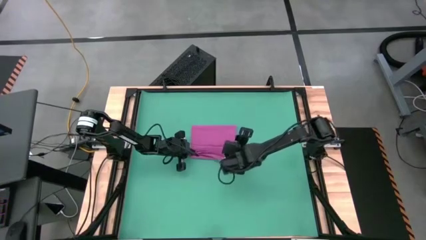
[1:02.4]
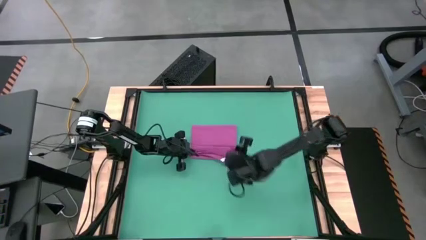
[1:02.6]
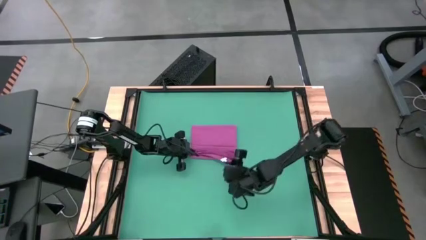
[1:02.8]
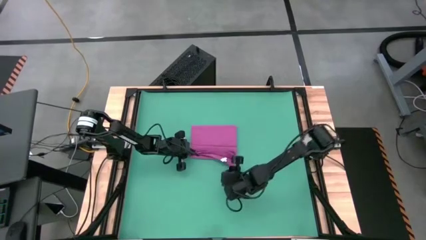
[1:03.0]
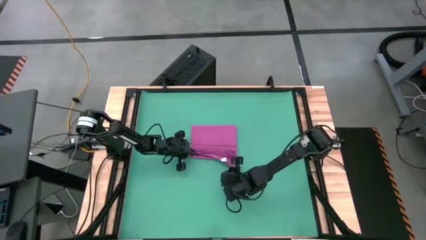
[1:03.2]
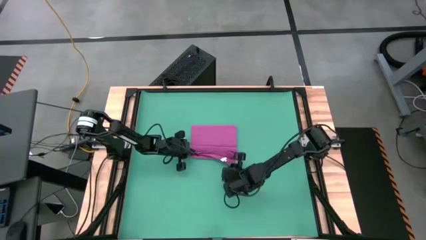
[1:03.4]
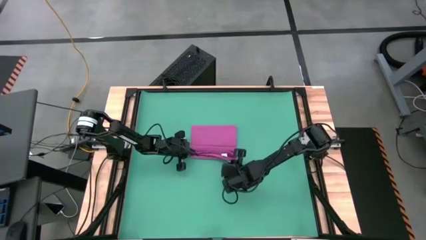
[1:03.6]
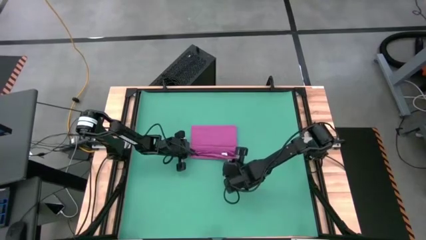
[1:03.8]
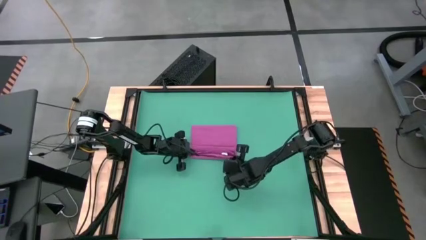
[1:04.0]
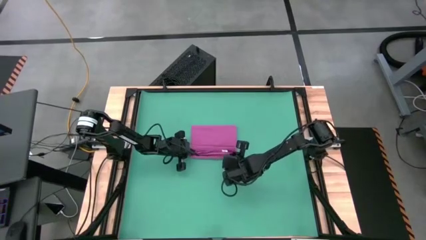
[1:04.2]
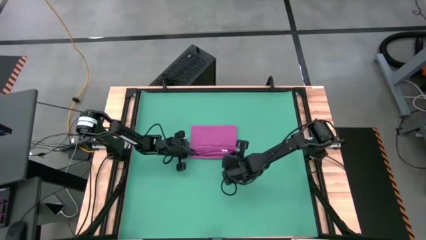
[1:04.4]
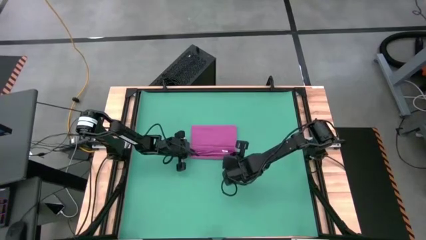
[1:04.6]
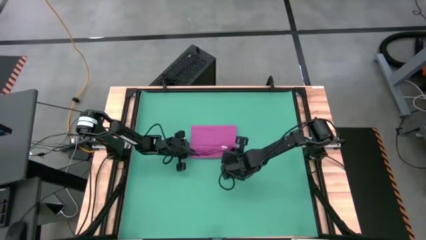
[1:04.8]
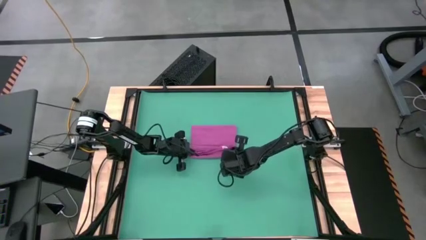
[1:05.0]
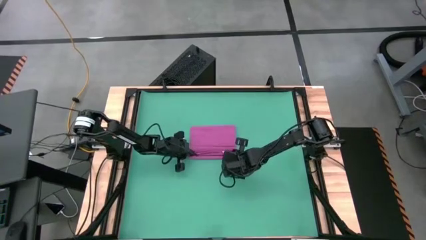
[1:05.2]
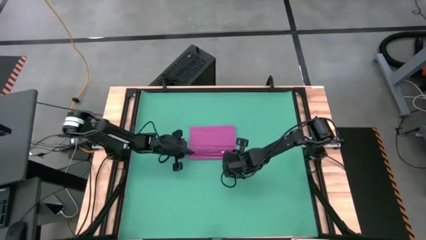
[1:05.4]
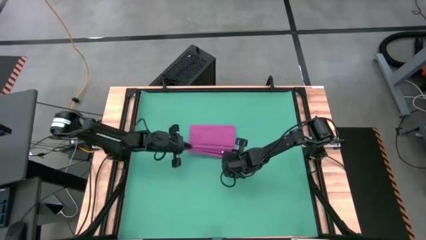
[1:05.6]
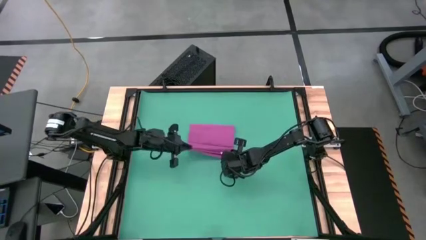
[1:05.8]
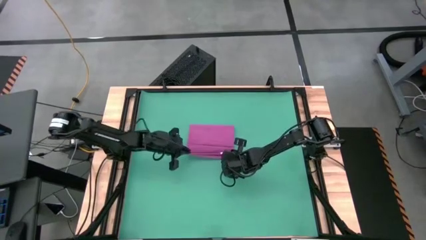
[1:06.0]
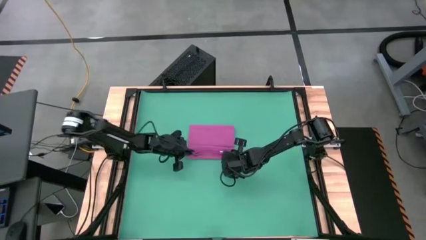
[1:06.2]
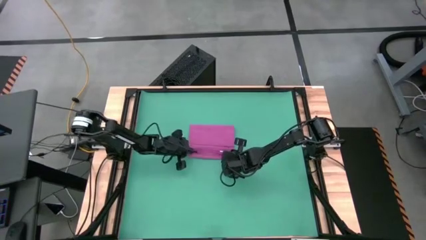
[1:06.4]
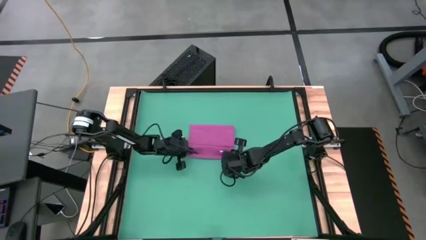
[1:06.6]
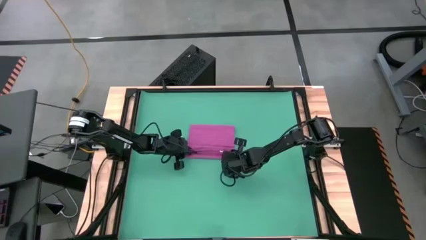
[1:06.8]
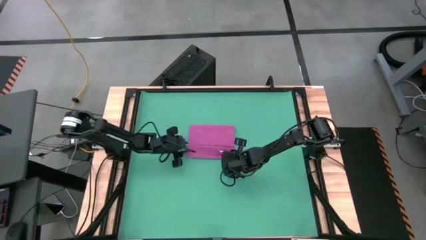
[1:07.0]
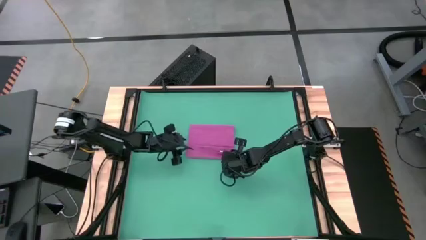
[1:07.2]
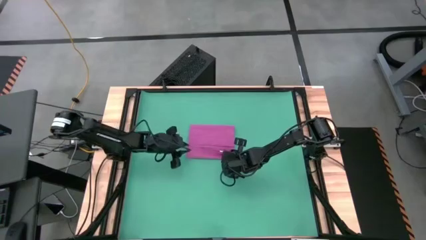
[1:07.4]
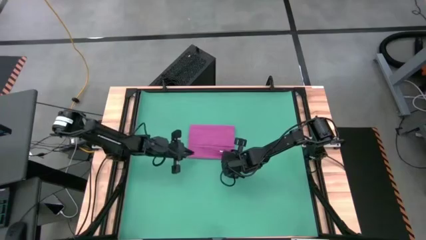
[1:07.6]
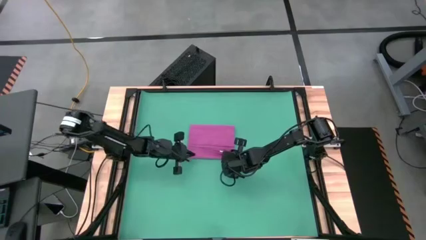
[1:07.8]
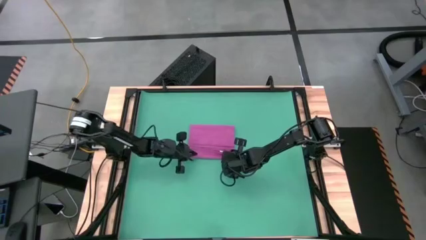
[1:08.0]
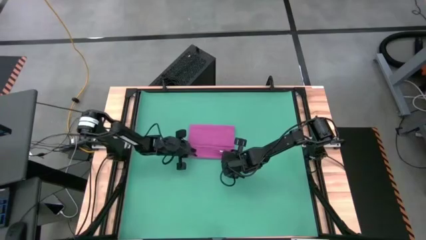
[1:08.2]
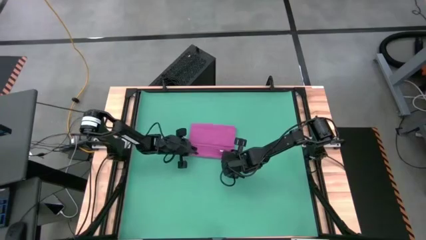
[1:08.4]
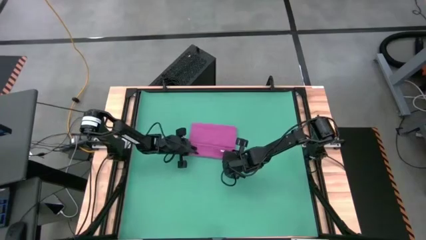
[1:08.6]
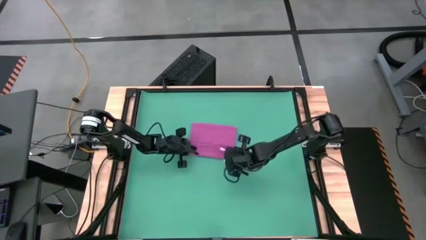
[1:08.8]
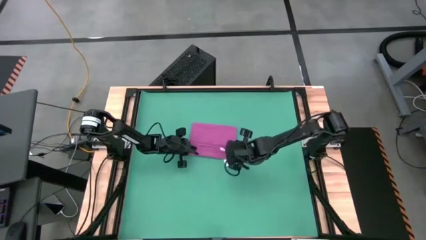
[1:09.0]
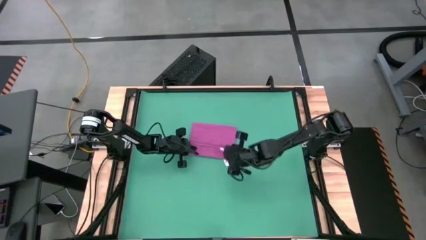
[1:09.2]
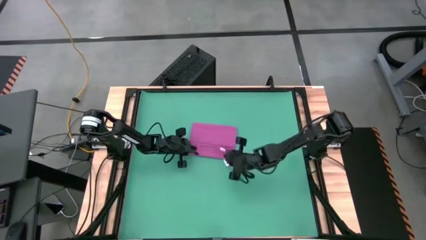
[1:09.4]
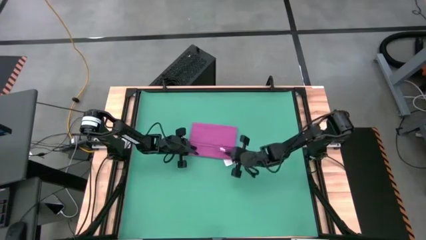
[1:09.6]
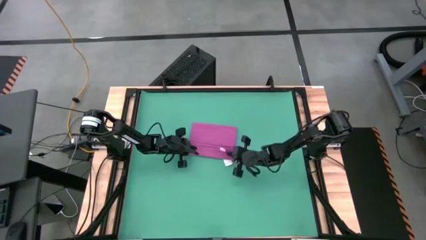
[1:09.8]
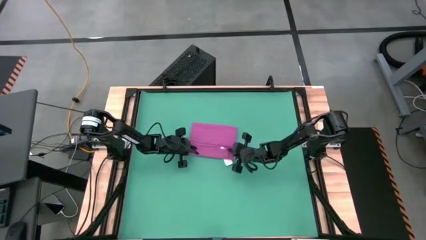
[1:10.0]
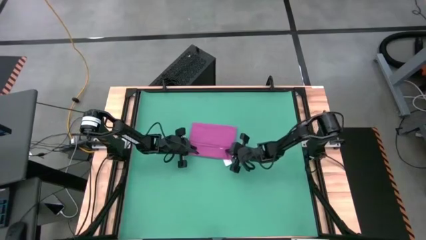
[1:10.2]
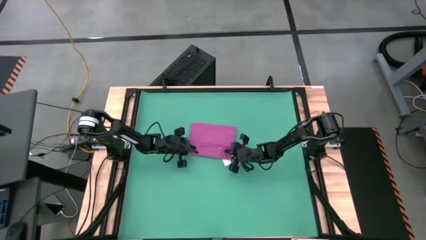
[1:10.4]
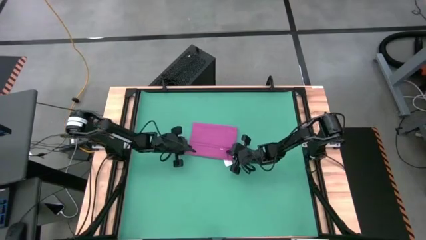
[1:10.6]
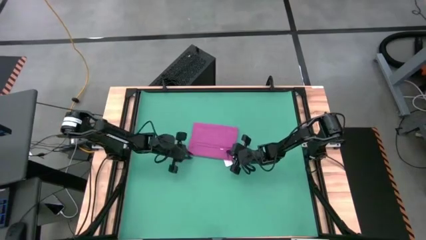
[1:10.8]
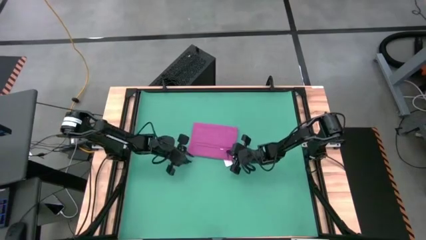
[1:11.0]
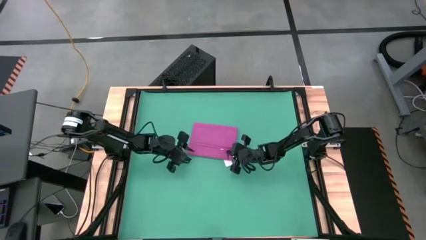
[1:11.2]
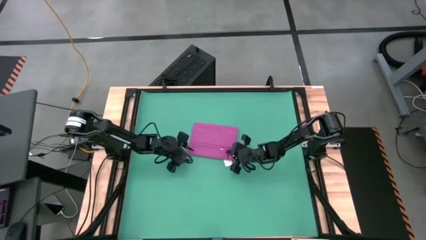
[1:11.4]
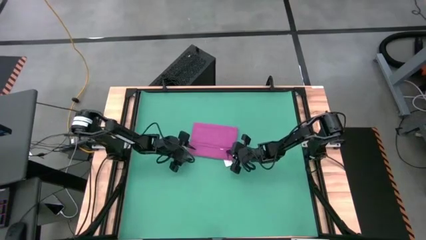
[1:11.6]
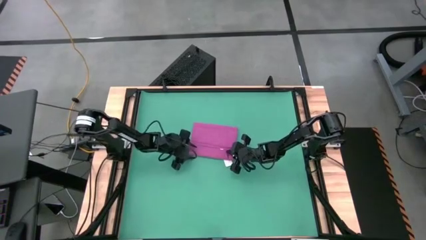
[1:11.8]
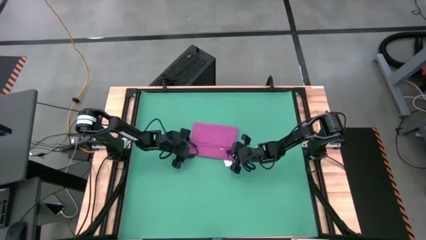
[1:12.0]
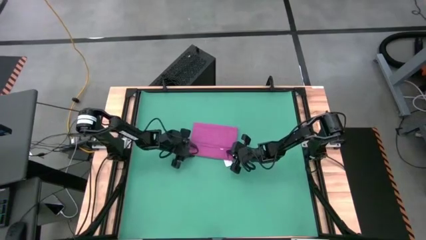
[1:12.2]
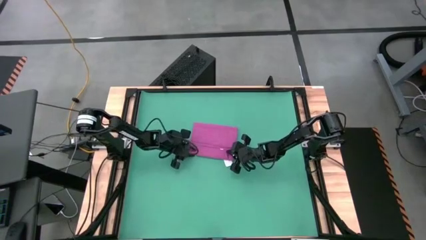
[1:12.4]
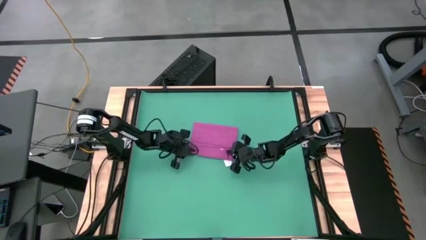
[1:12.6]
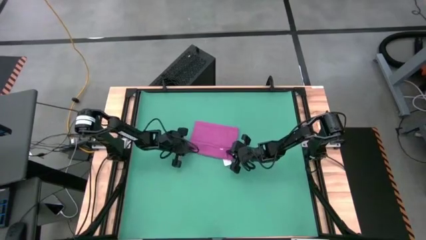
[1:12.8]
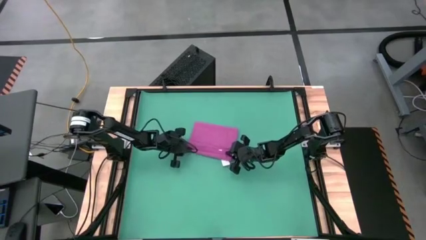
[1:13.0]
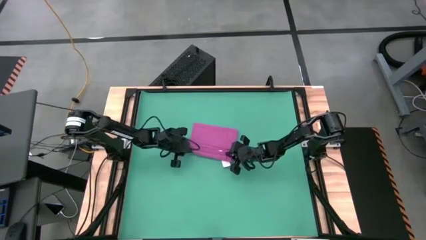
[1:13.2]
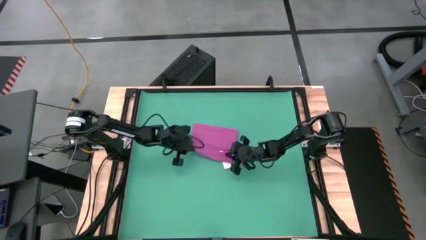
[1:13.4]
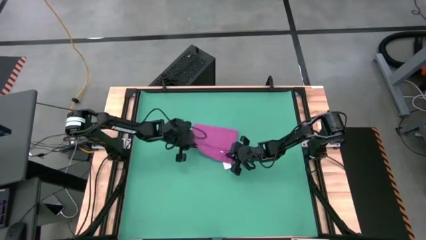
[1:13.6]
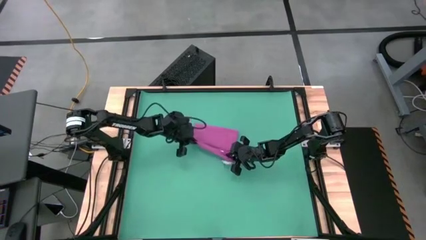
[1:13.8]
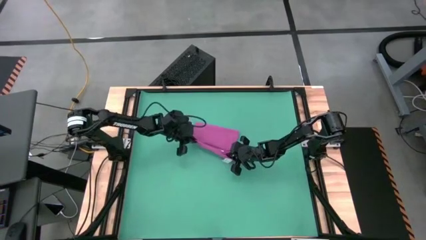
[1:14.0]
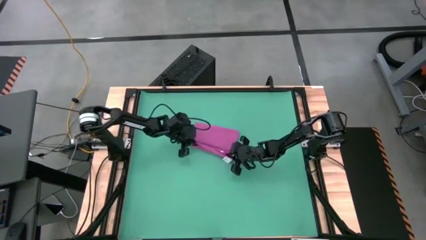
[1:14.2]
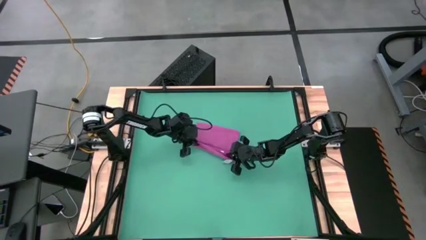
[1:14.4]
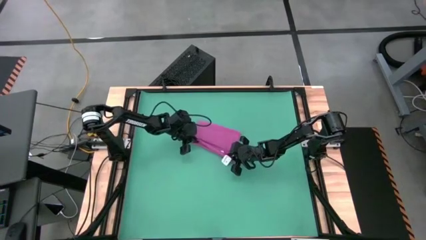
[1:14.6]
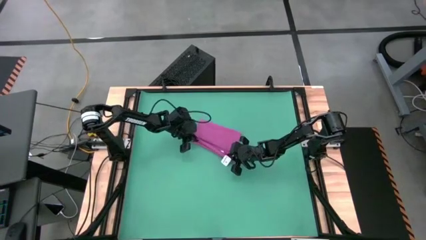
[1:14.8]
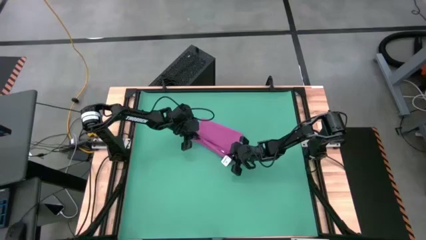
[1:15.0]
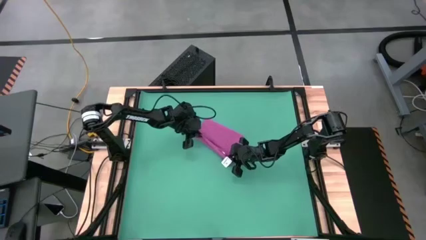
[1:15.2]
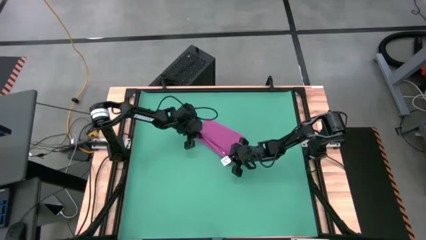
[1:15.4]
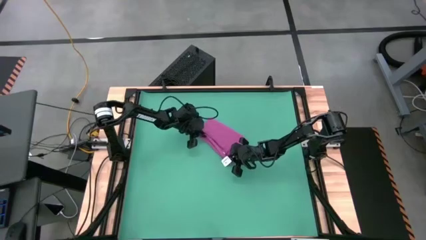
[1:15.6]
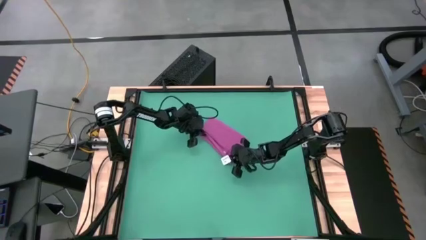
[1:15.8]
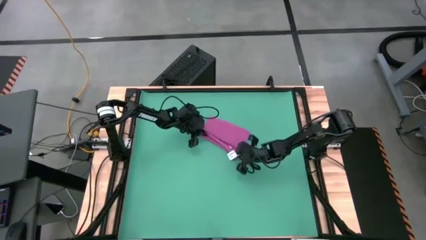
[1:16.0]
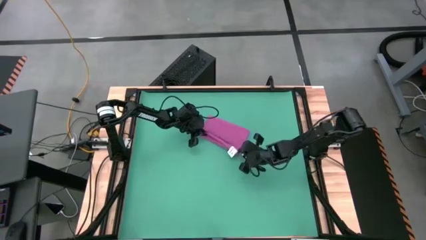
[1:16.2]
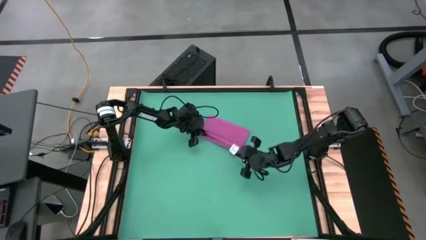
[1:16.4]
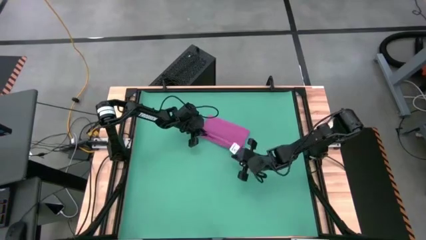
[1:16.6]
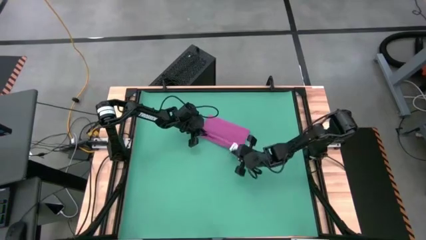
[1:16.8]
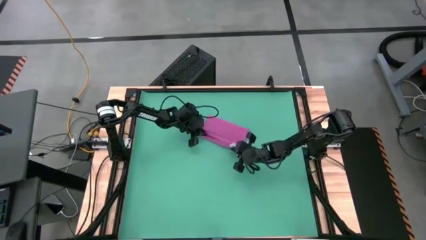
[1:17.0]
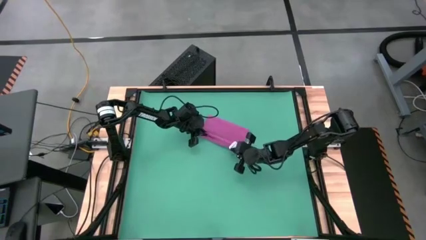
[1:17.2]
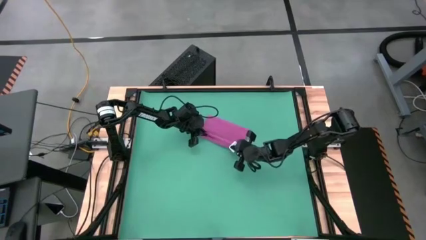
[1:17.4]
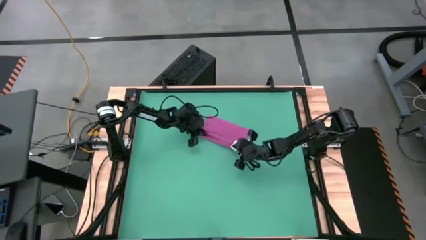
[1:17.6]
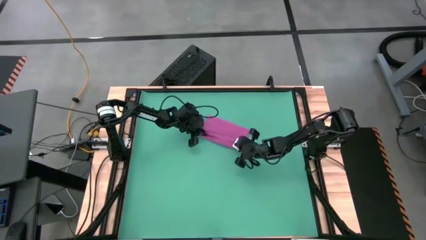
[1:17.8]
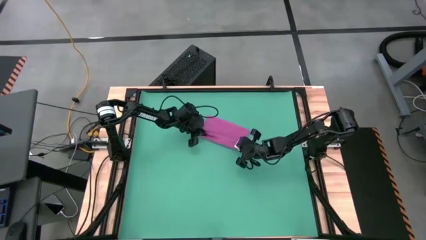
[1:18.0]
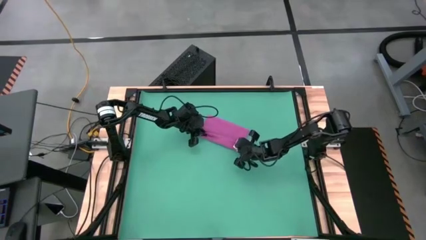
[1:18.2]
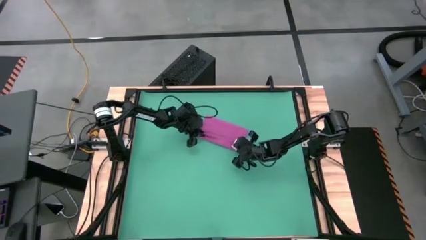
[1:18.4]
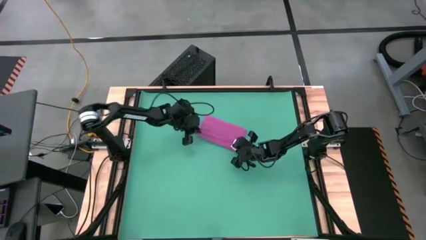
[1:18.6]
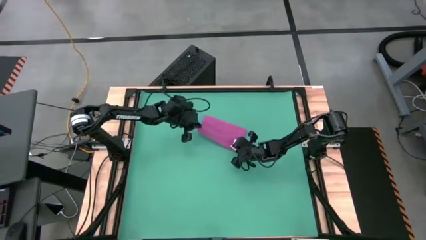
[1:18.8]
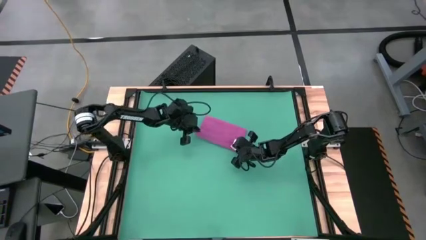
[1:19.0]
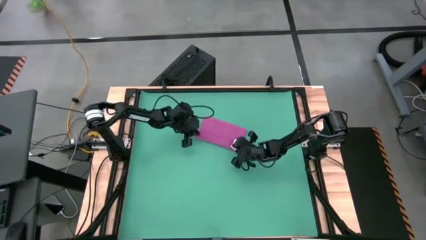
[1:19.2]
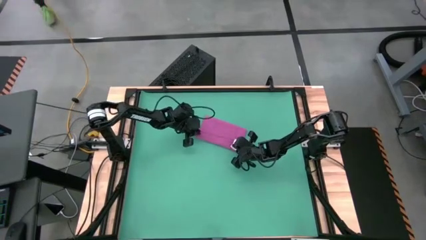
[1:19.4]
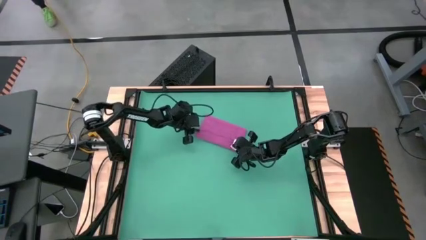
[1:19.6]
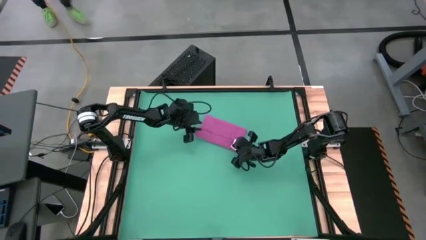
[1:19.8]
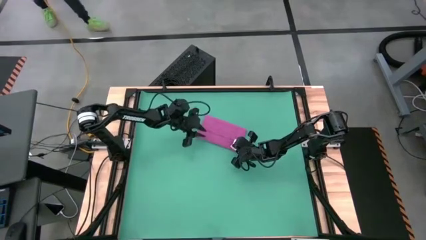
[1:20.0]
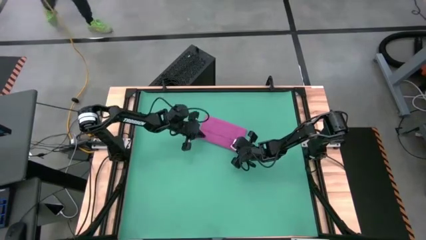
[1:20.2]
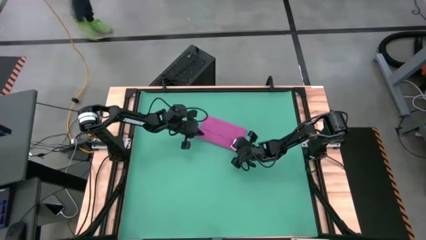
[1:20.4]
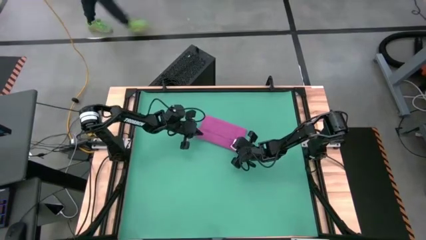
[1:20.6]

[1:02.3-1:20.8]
Task: Roll towel into tight, uniform cylinder
Roll the pink towel
